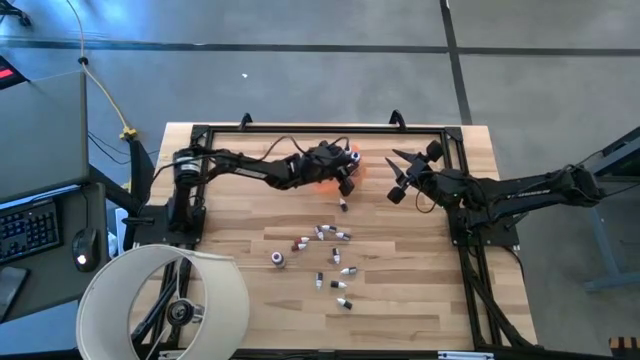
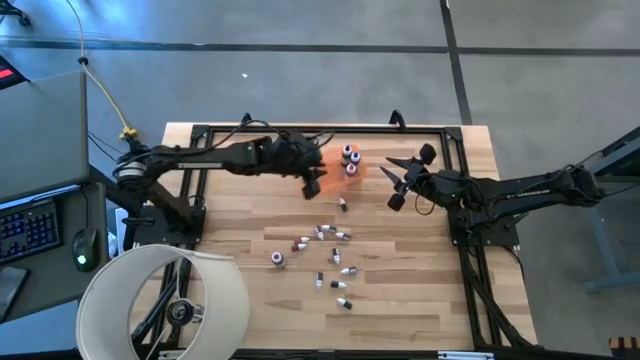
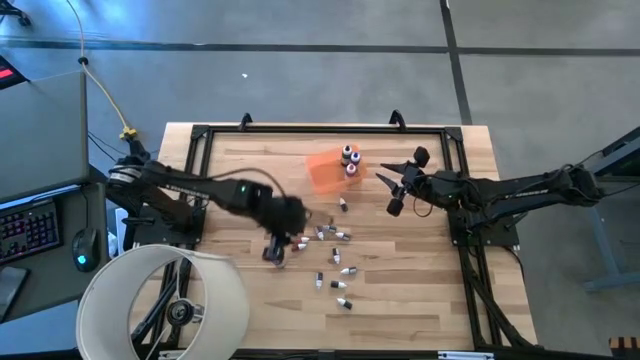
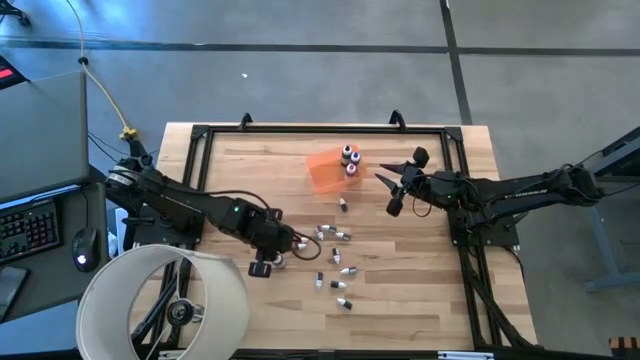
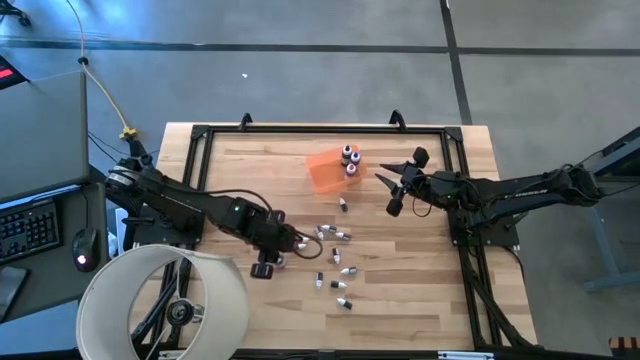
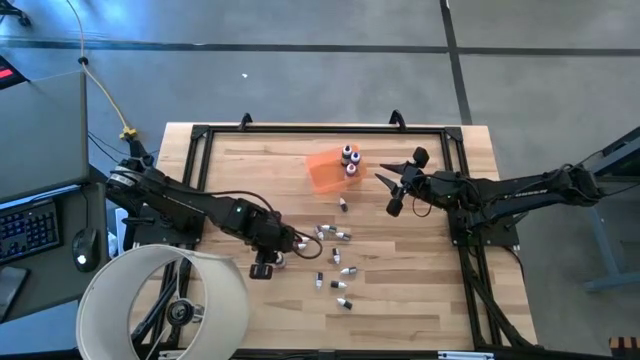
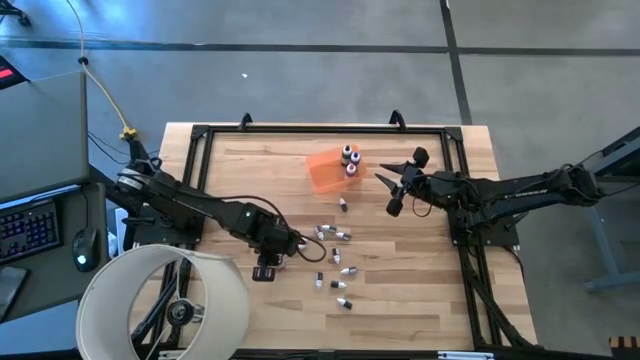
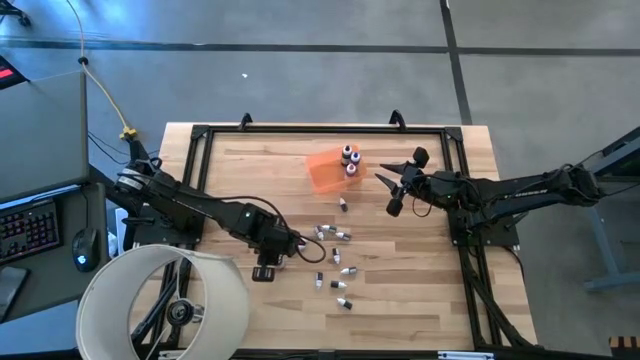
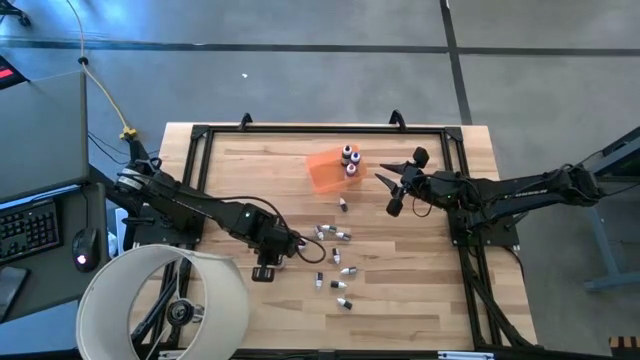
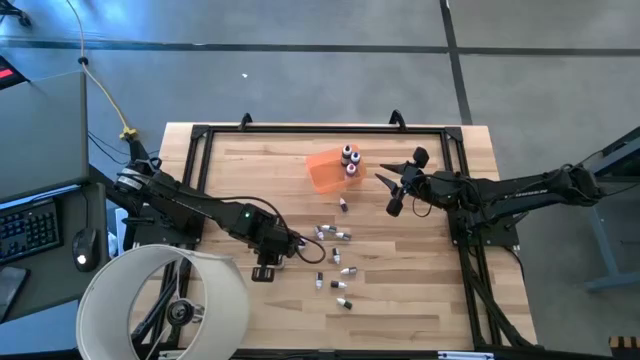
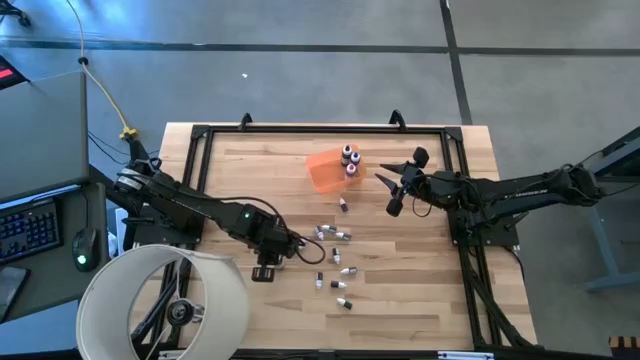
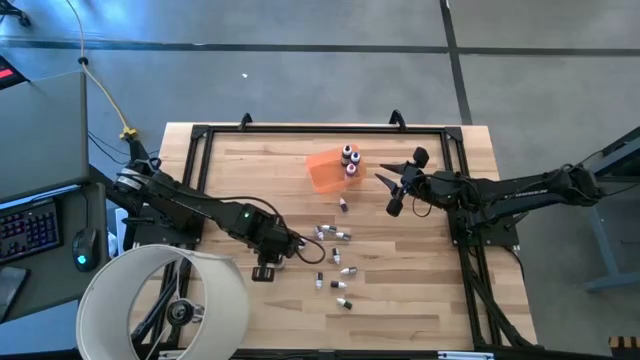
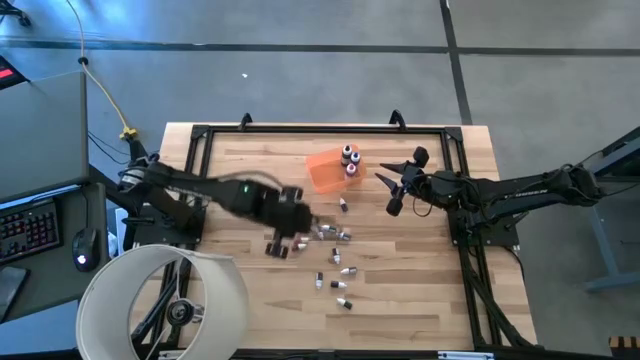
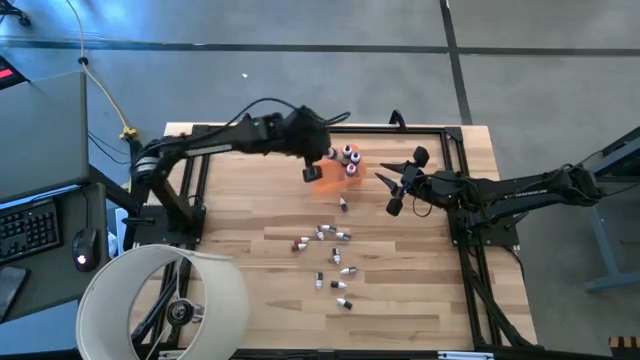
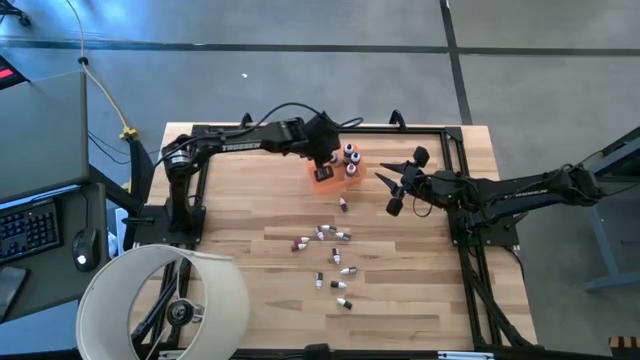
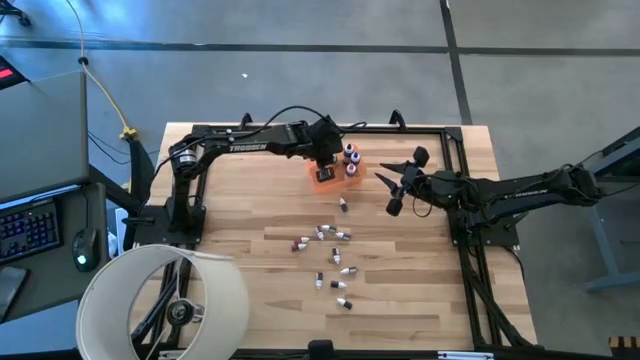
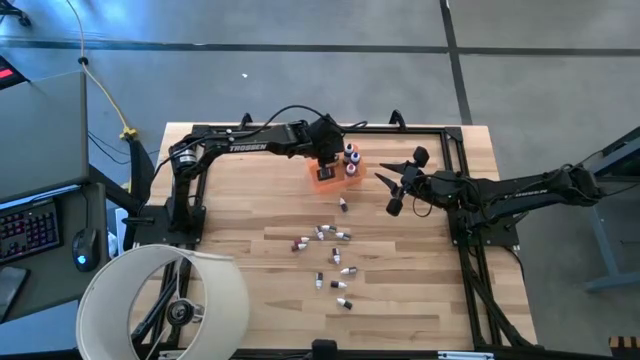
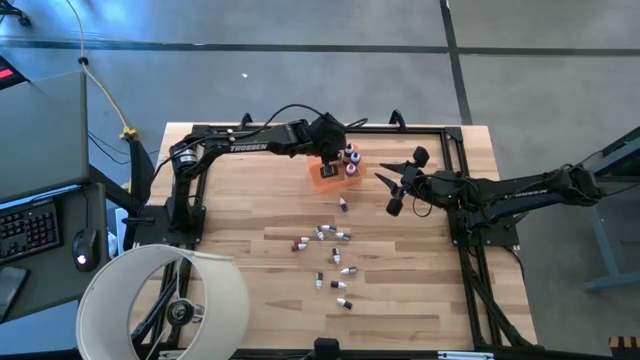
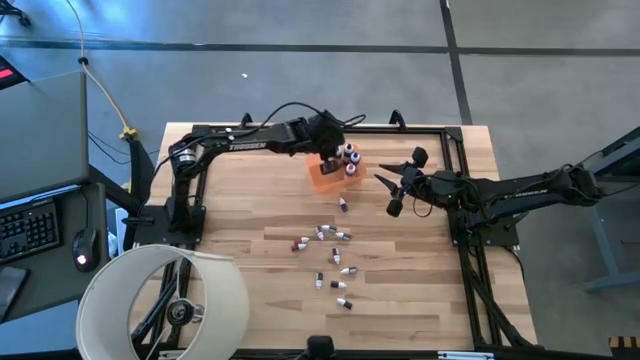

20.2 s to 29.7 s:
Task: Pick & Place food coloring
Put the big violet food coloring bottle into the orange bin

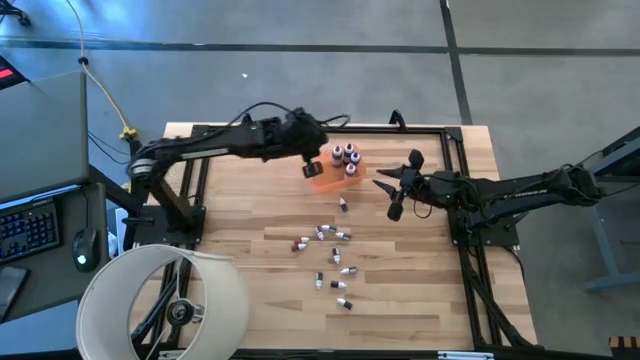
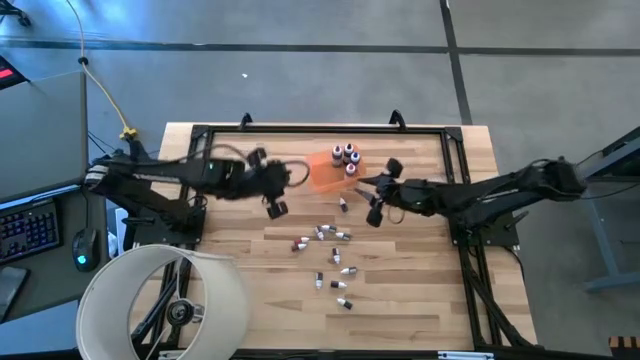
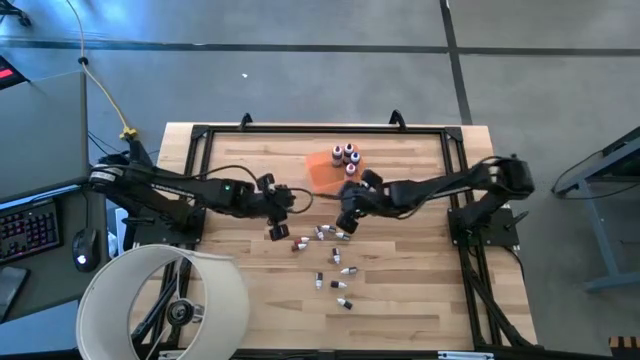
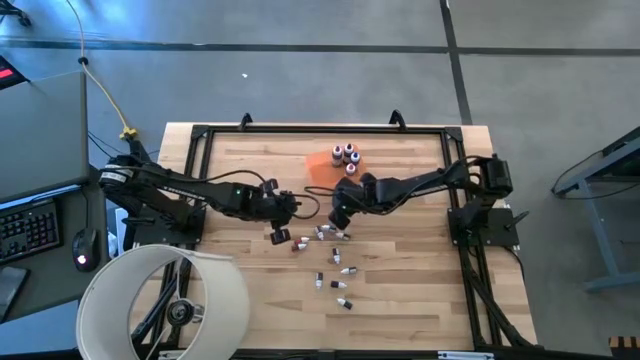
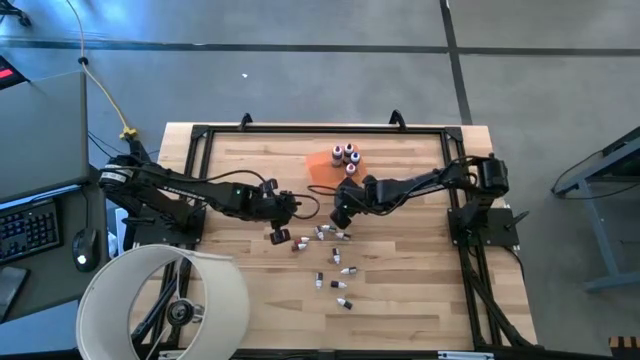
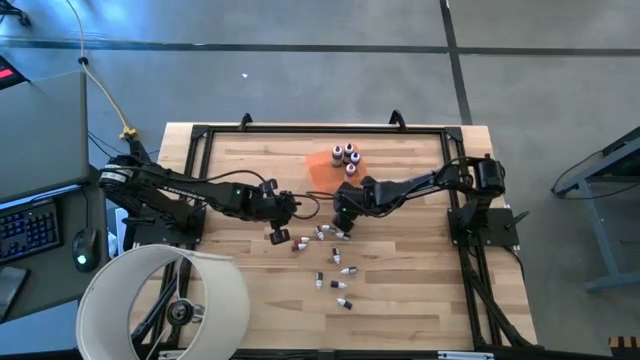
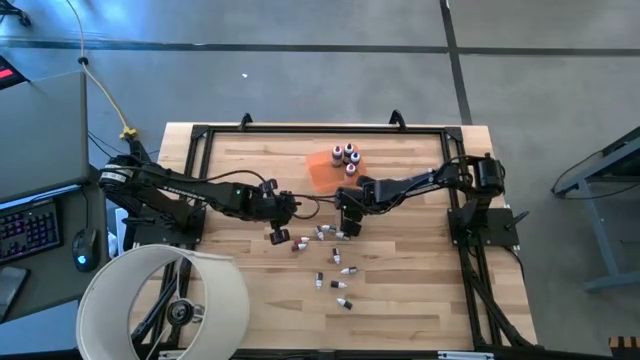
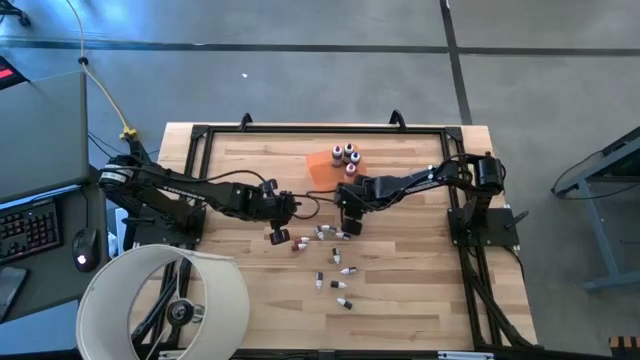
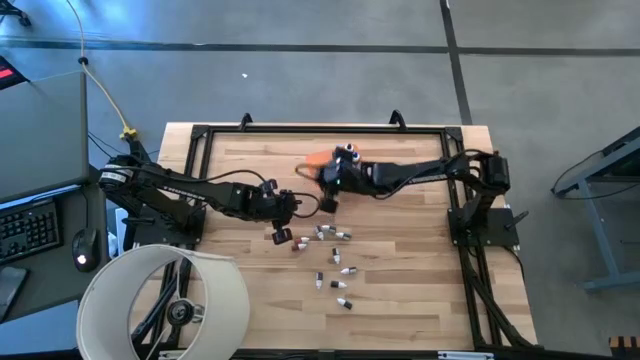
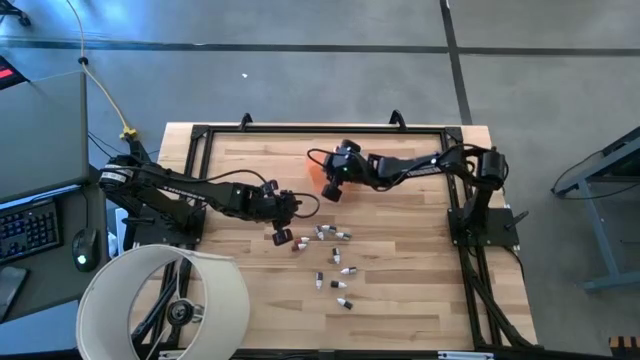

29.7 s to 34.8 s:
Put the small violet food coloring bottle into the orange bin

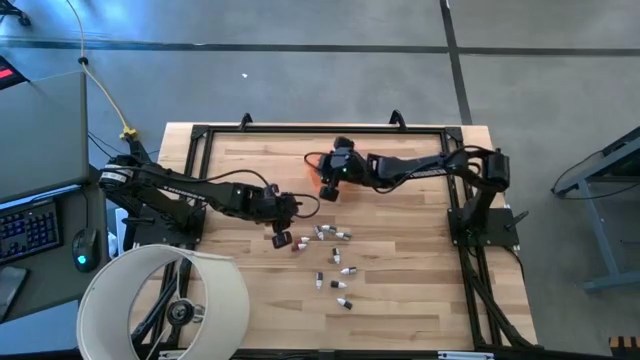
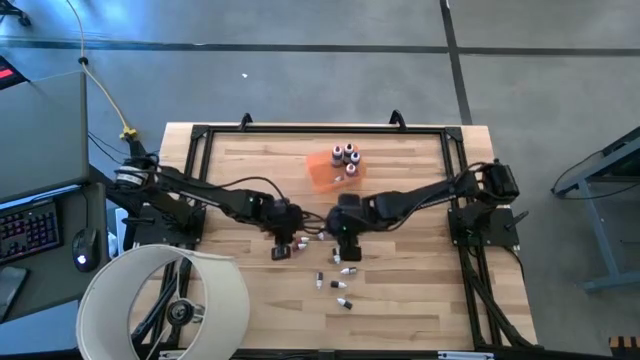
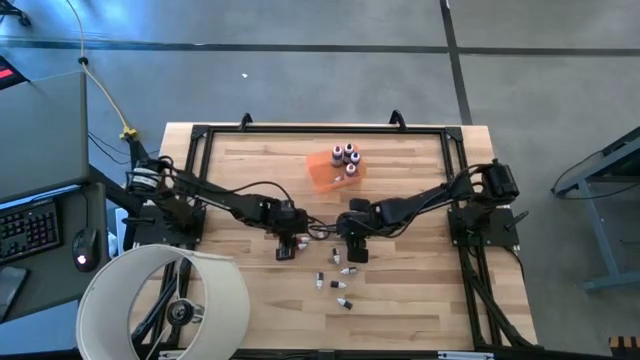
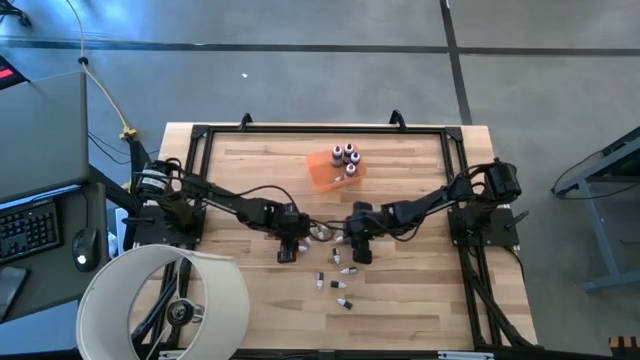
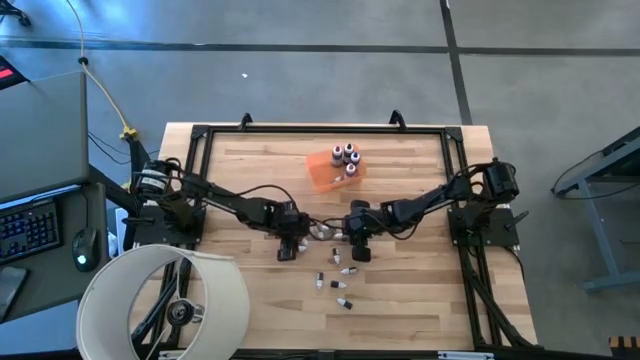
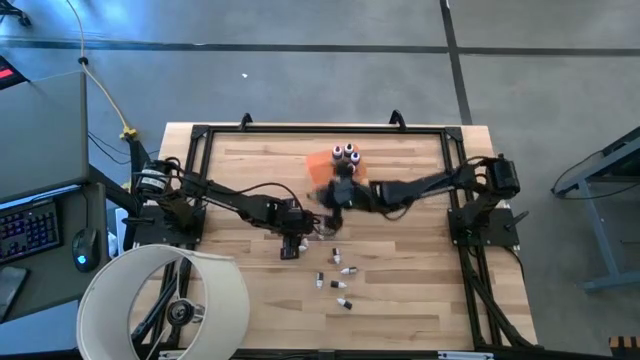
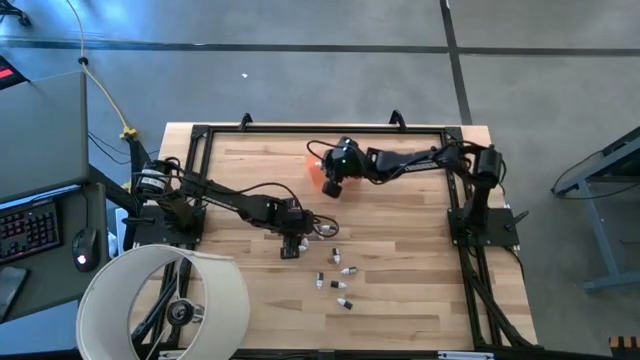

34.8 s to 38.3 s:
Put the small red food coloring bottle into the orange bin

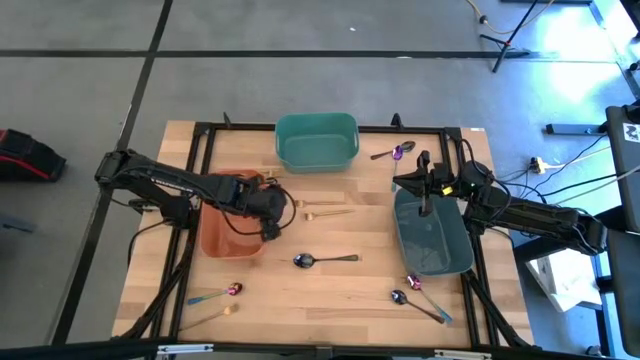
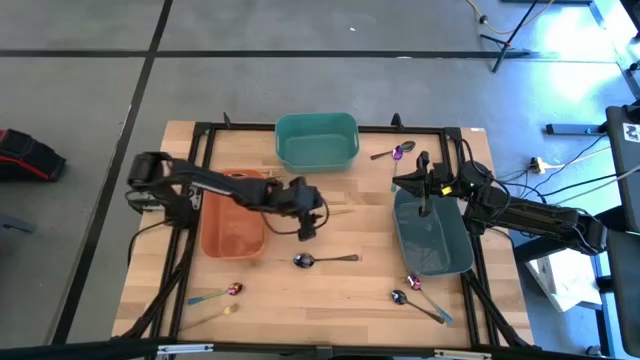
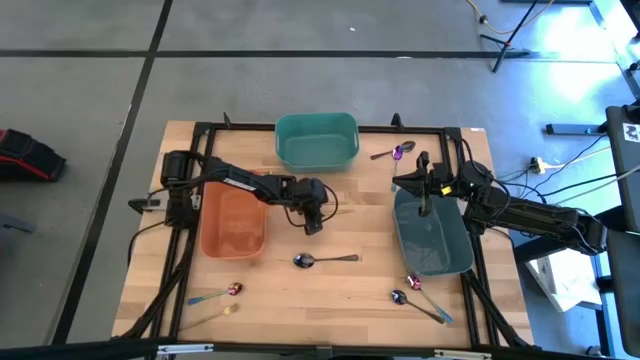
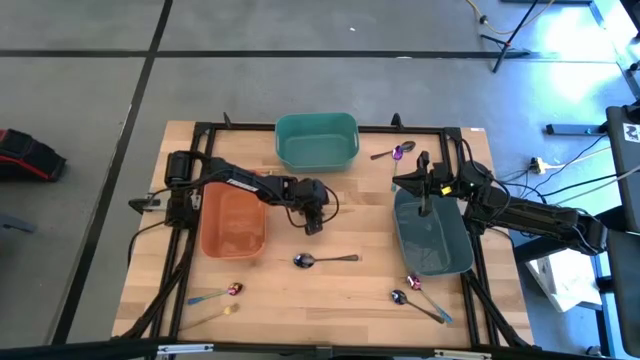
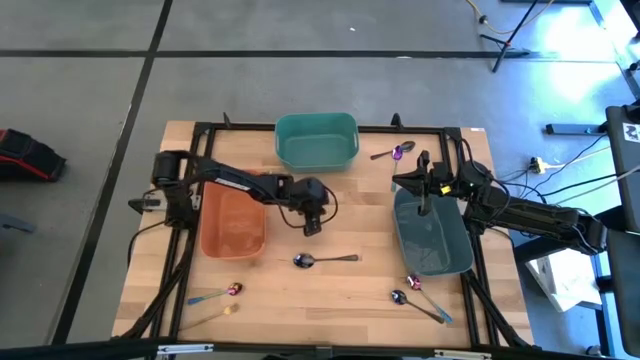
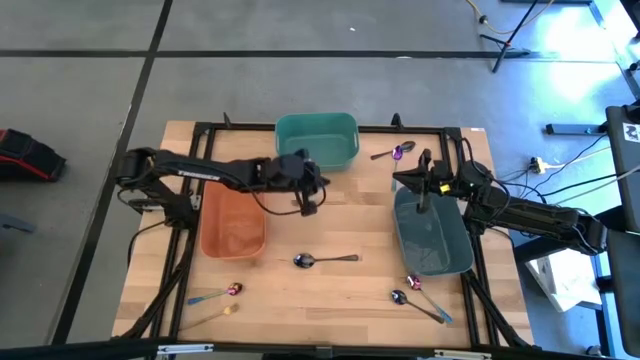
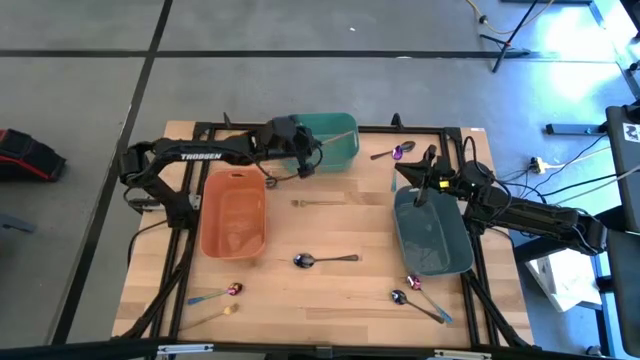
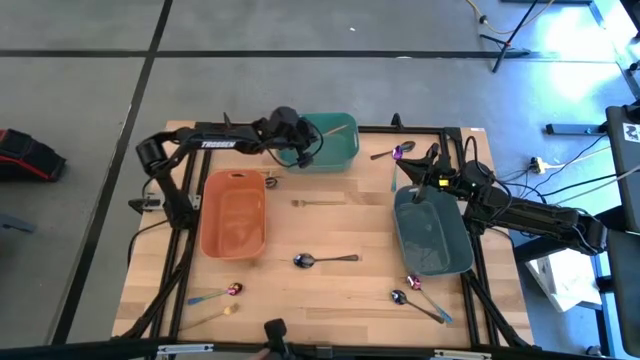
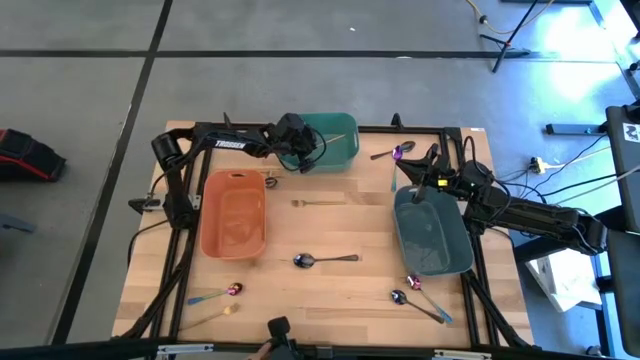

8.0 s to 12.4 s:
Task: Sort silverware by color (type)
Put the gold fork into the green bin
